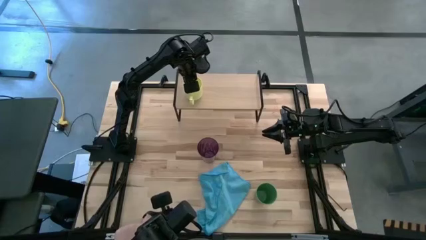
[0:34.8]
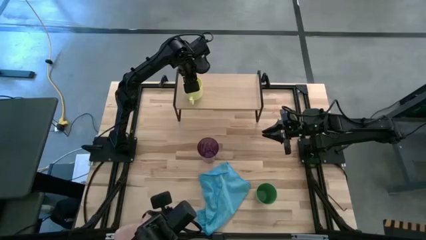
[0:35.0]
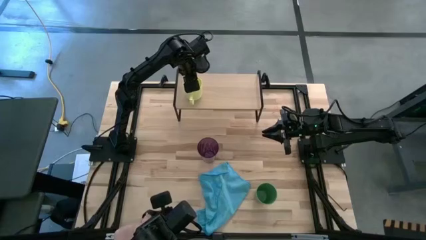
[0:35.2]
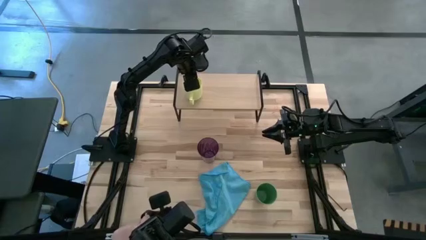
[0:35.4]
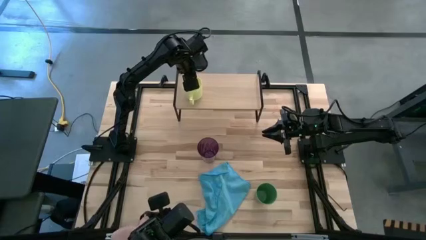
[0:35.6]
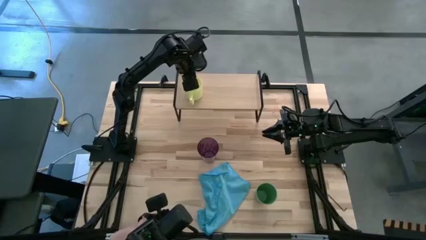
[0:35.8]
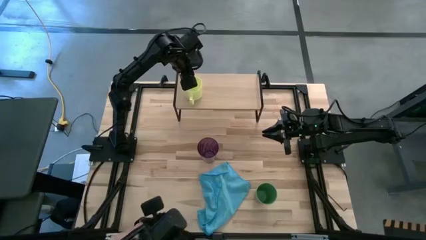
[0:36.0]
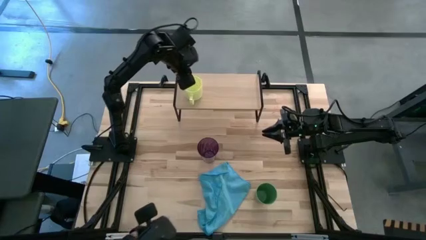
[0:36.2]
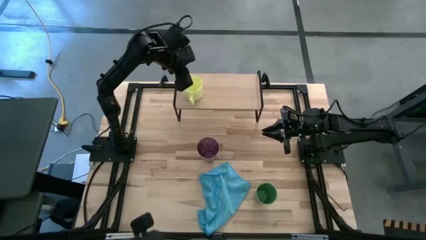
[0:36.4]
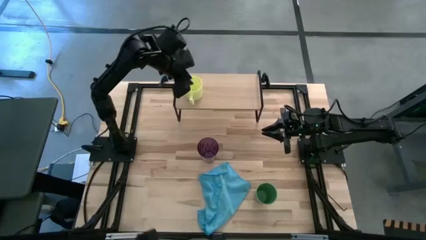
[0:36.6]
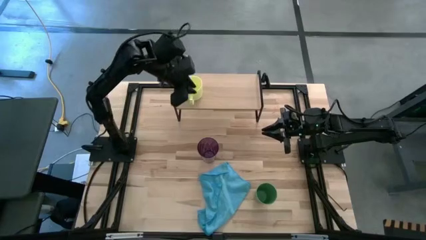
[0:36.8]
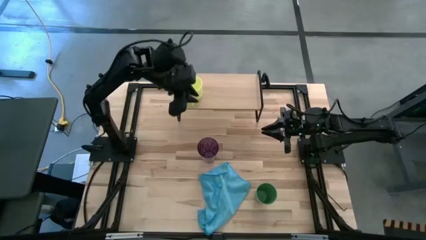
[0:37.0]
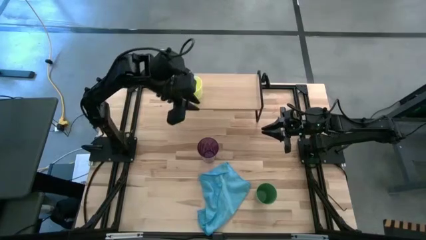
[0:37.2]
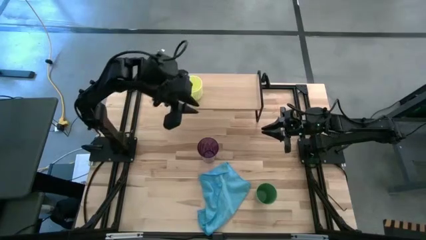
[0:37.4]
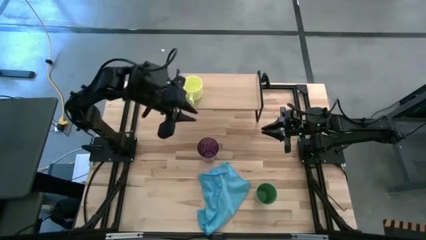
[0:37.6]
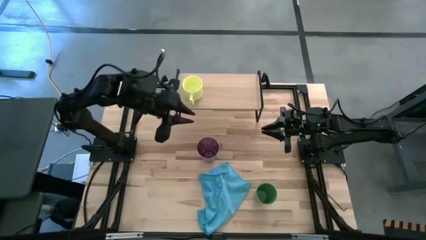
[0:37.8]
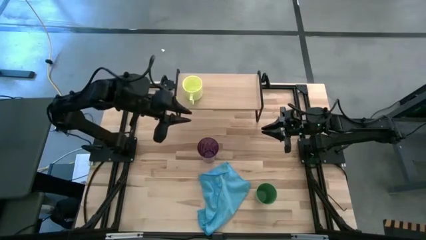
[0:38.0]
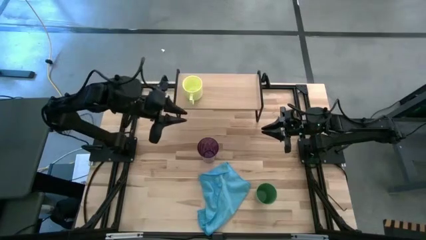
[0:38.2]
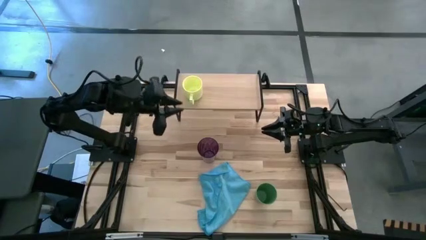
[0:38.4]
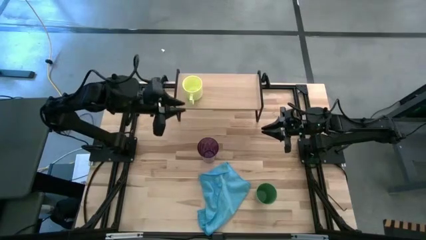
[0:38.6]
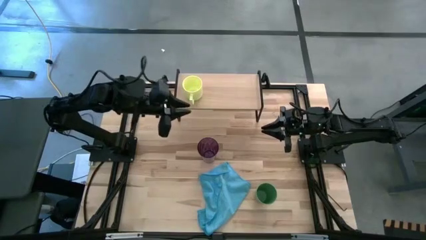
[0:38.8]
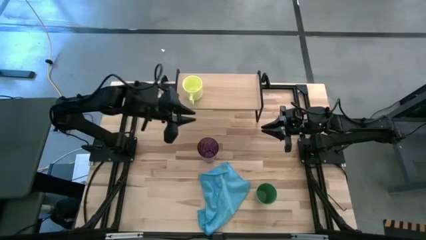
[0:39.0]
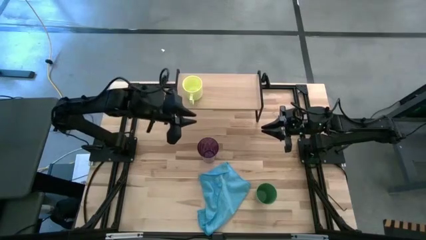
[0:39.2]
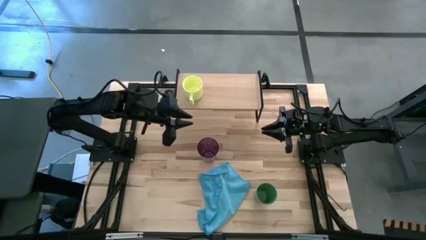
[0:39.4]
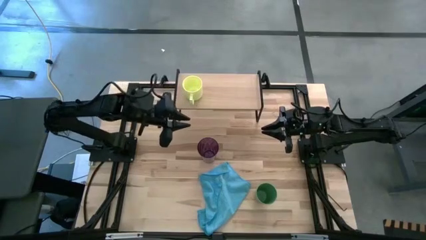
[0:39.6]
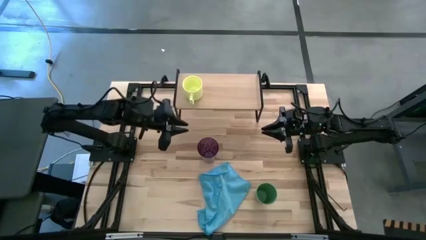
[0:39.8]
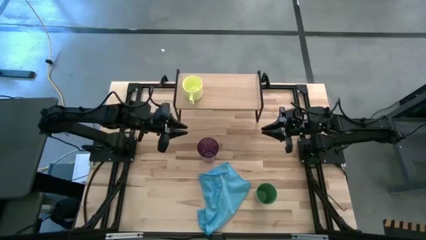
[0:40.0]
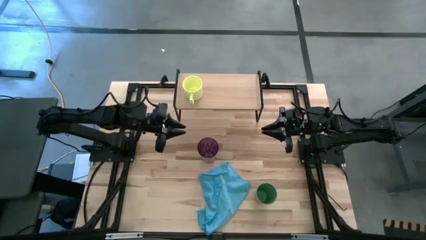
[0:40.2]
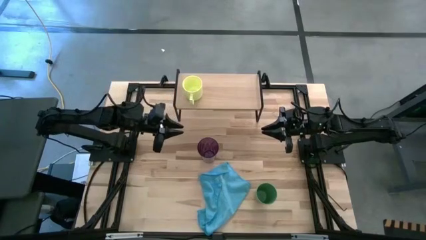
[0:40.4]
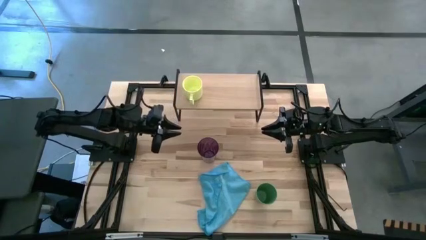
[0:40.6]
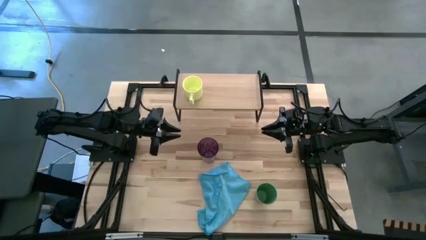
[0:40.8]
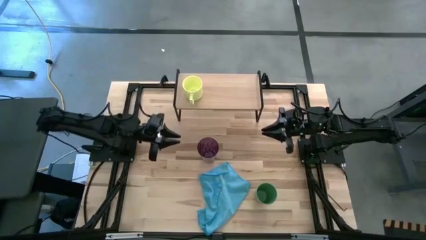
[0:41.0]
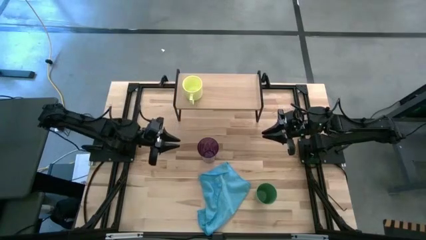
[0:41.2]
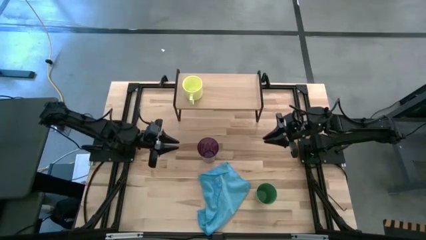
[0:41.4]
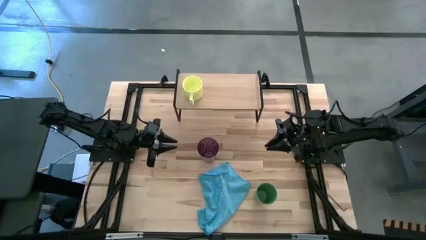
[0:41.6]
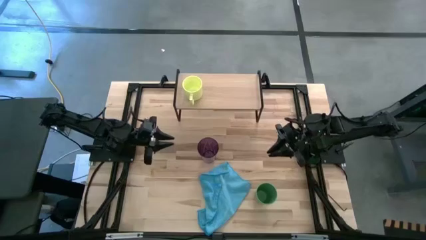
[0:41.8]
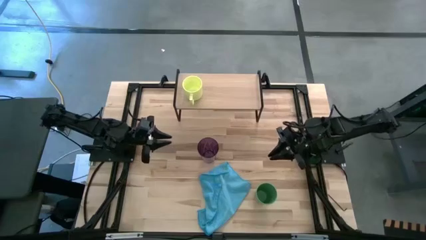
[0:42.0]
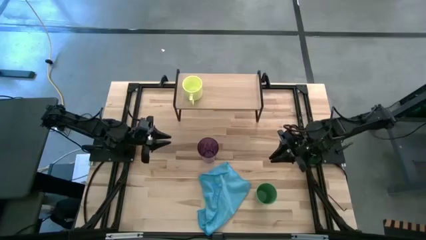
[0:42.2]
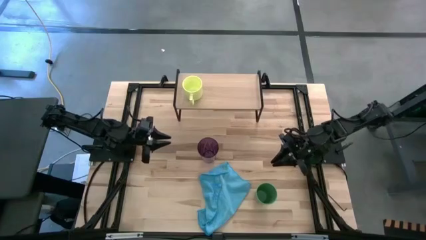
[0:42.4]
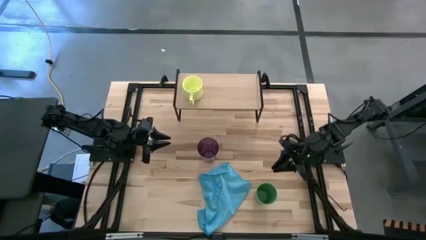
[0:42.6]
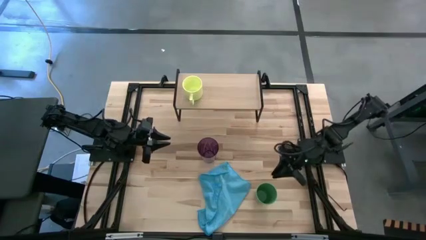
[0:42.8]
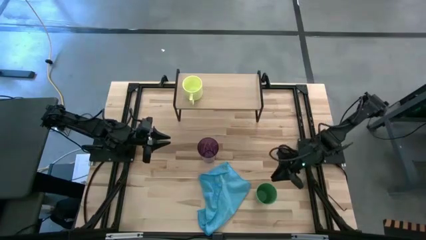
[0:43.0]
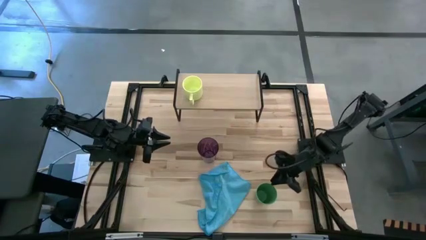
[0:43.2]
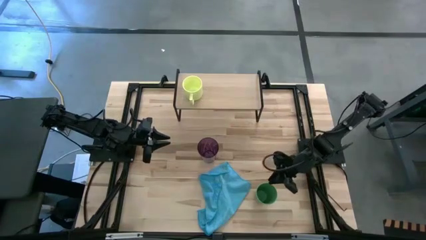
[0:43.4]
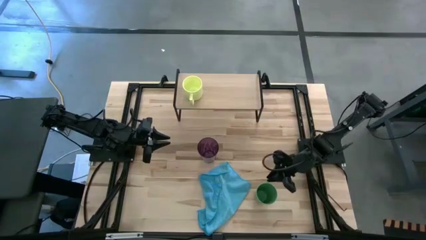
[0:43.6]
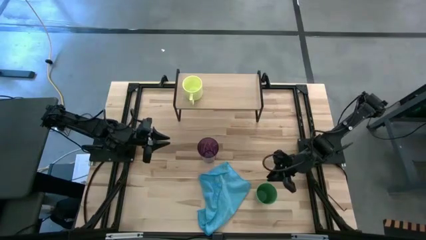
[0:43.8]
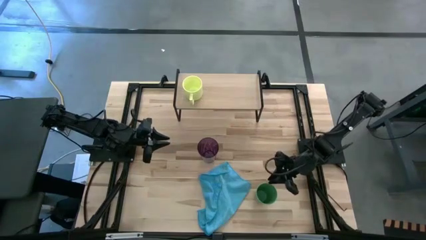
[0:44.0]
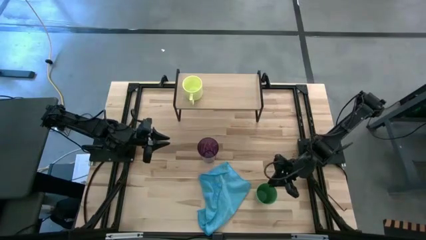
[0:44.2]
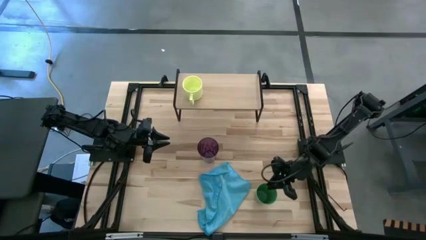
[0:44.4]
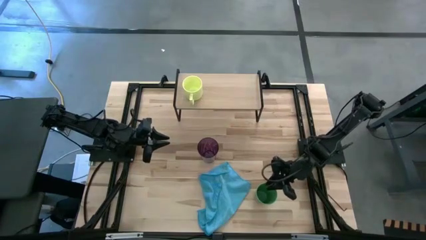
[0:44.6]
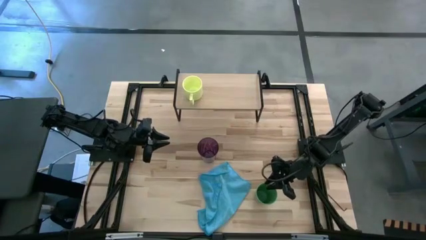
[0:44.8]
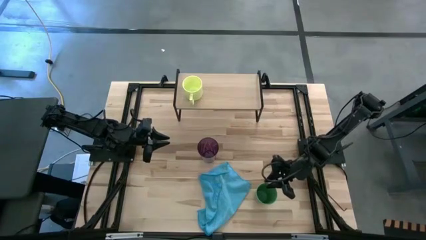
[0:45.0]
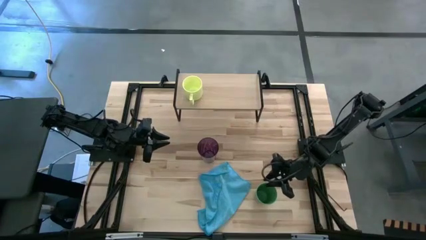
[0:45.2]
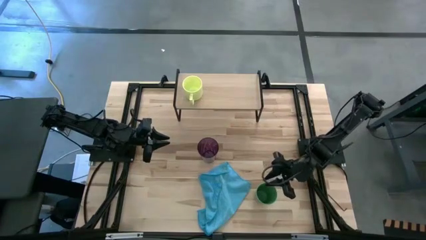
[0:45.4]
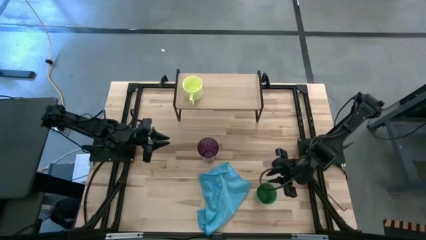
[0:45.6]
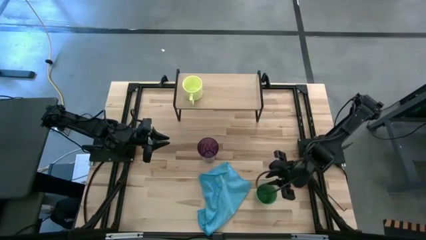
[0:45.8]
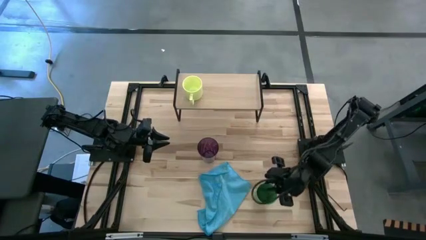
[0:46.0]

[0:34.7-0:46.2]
Task: Stack small to large cups/mugs on shelf
Put the green cup on the shelf
